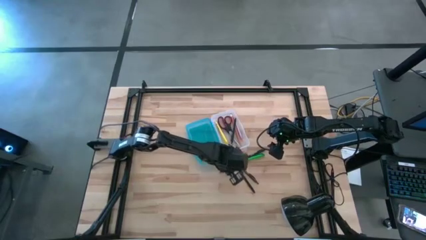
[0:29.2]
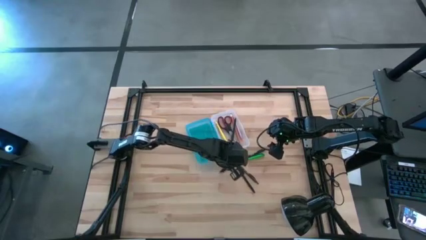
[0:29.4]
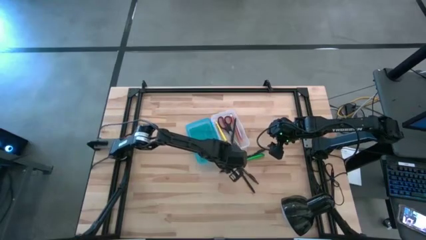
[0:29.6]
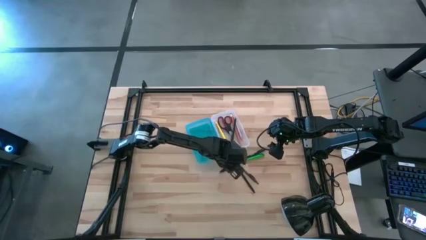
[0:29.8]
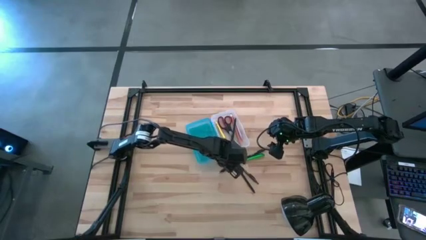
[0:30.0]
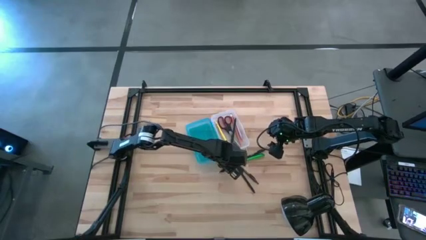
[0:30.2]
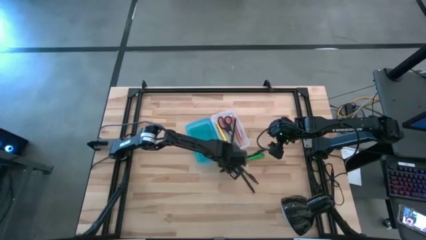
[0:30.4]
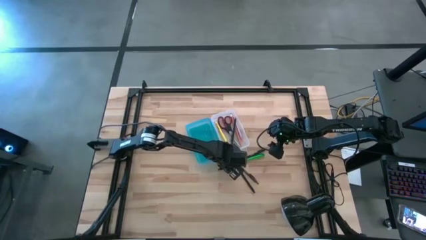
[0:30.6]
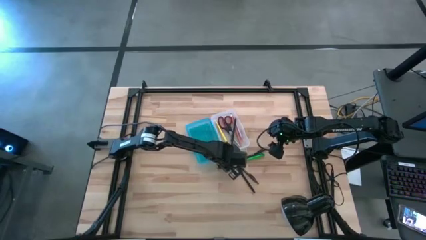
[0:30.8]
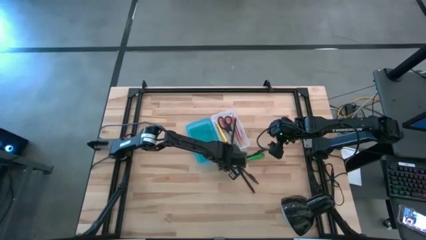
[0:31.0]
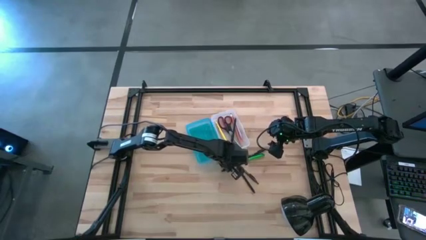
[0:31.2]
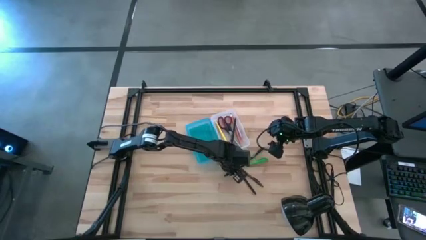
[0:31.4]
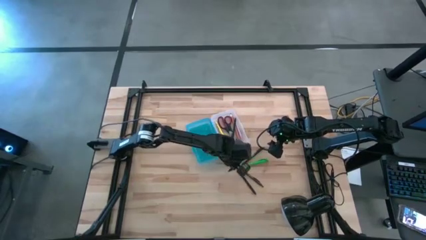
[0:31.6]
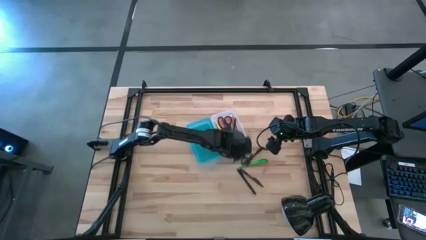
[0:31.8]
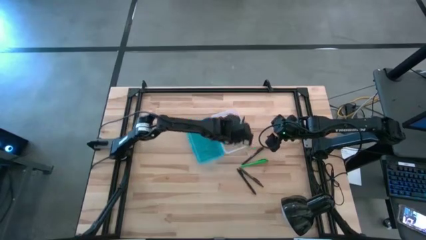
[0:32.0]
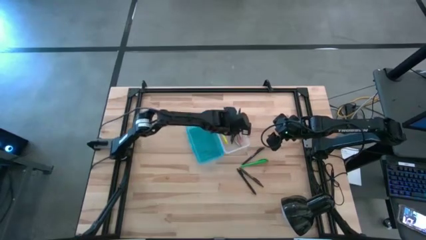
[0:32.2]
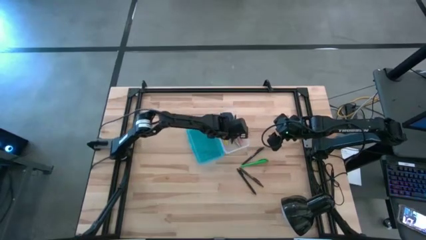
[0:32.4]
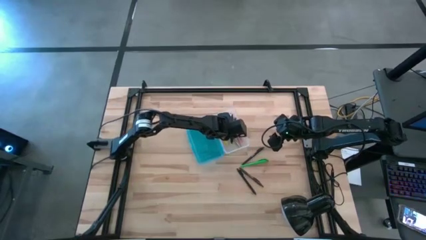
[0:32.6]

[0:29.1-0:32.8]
Task: Pick & place school supplies into a supply box
Put the black pen into the blue supply box

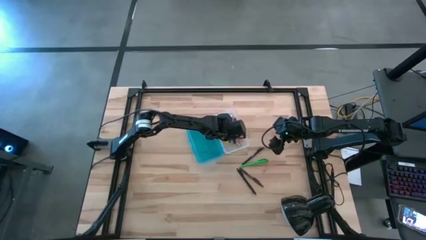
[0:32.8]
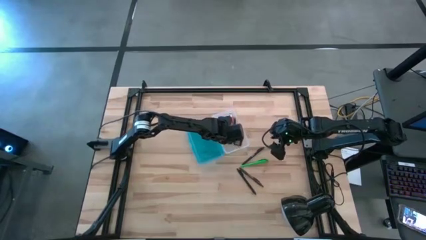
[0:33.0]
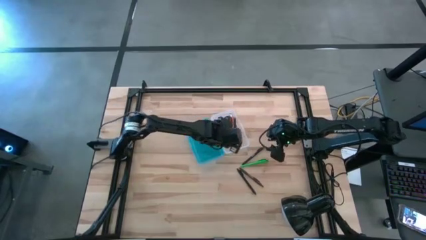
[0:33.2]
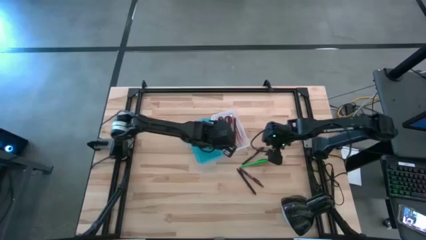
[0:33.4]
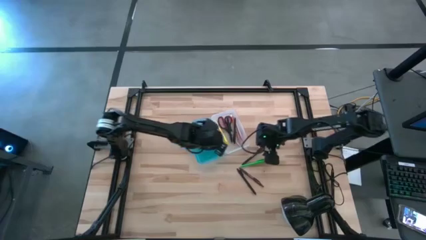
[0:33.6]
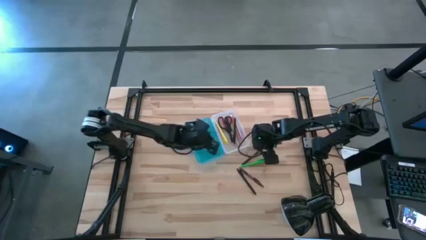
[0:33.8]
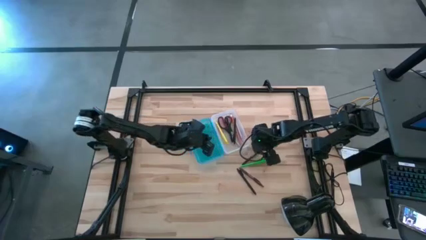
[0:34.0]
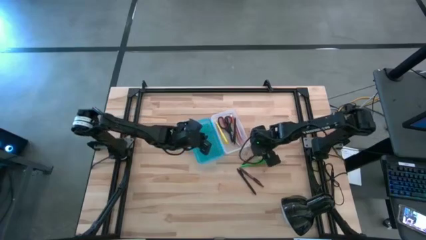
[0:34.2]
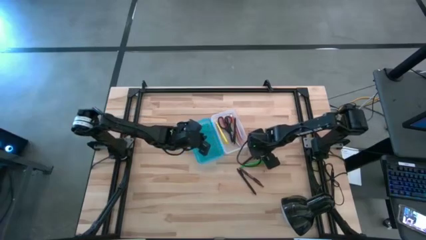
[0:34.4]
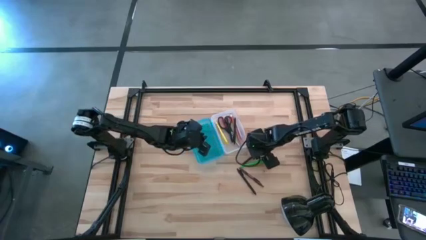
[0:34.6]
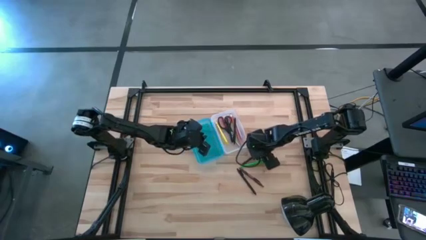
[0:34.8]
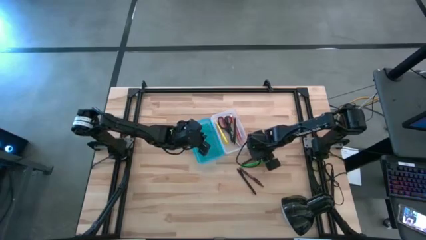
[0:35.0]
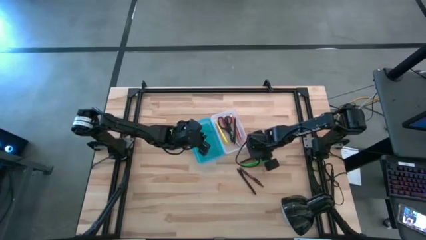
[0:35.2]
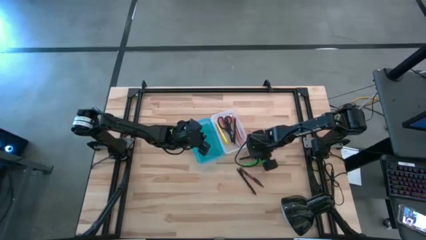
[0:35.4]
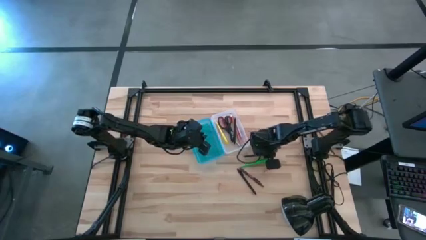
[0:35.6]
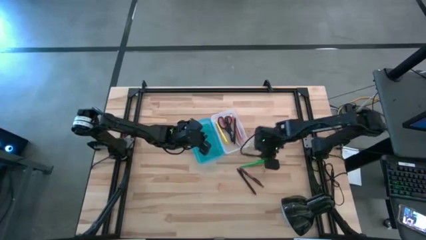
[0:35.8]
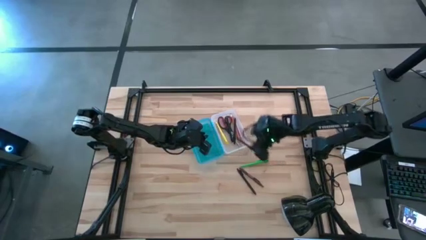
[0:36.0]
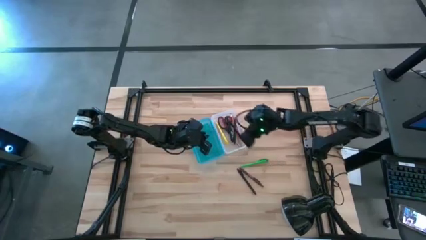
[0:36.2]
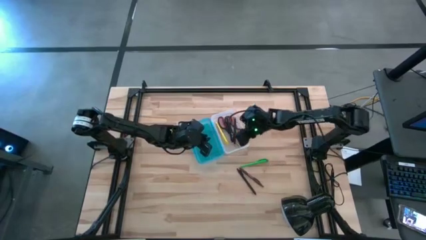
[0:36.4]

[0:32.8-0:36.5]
Put the black pen into the blue supply box

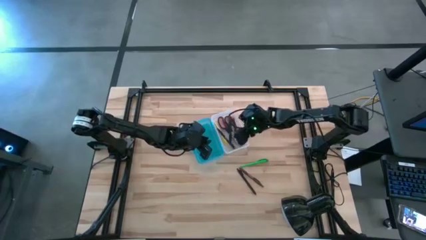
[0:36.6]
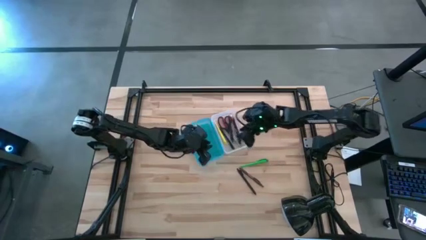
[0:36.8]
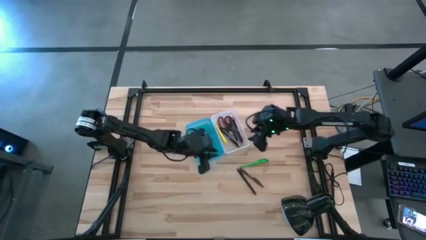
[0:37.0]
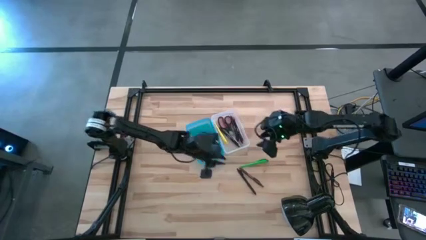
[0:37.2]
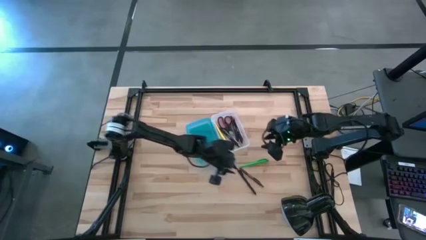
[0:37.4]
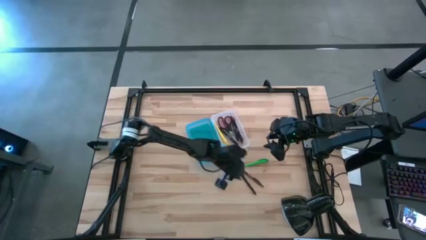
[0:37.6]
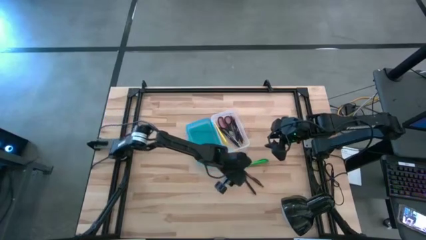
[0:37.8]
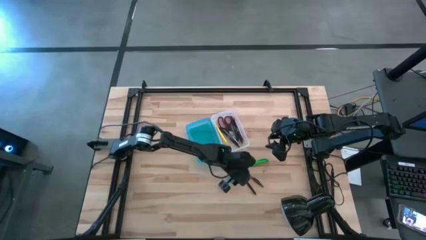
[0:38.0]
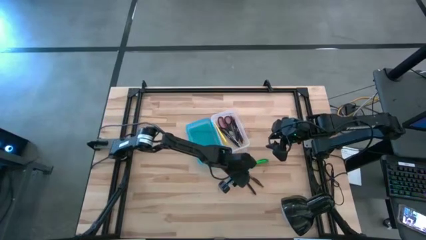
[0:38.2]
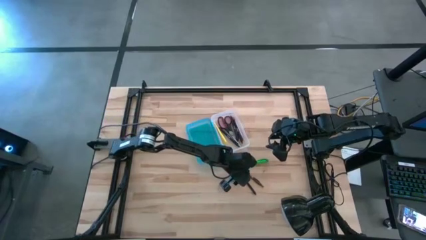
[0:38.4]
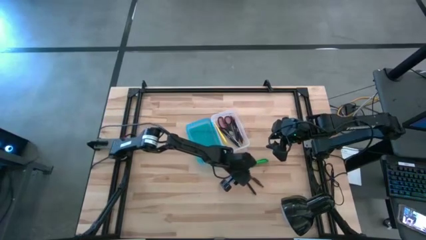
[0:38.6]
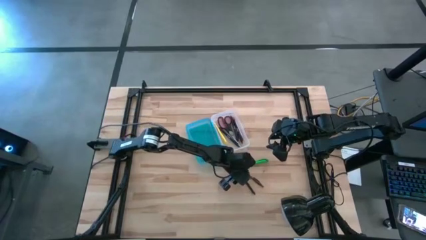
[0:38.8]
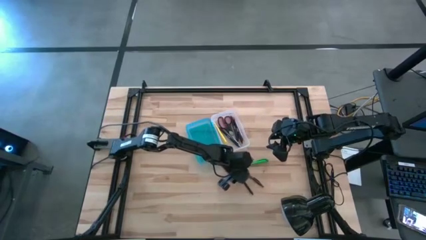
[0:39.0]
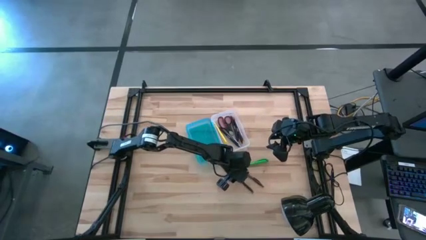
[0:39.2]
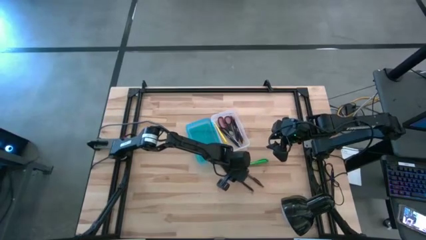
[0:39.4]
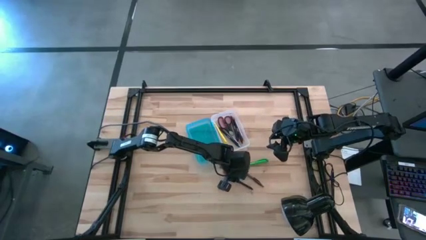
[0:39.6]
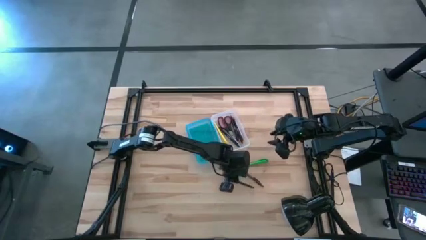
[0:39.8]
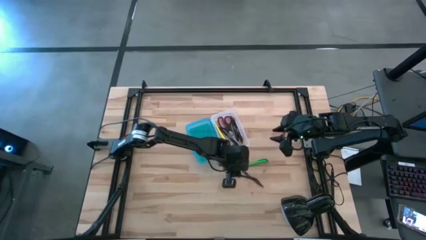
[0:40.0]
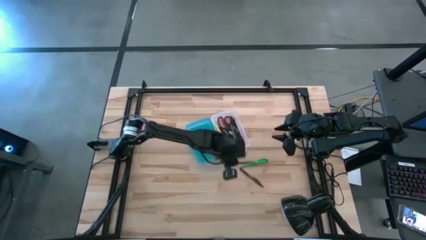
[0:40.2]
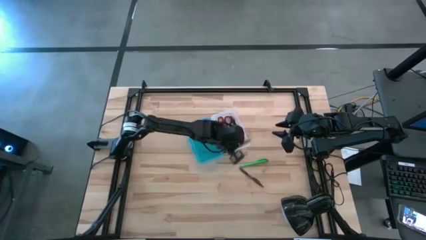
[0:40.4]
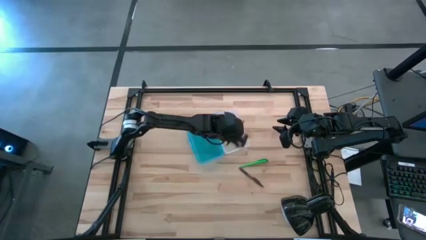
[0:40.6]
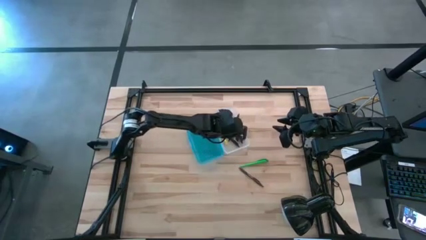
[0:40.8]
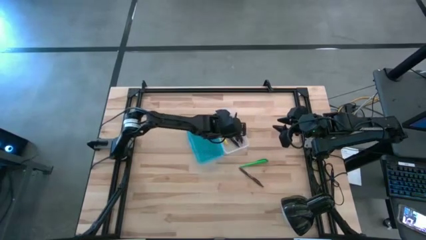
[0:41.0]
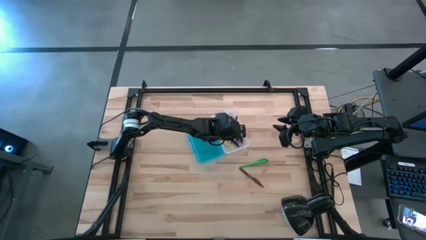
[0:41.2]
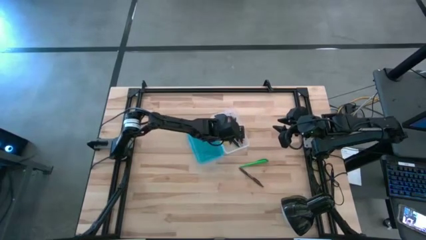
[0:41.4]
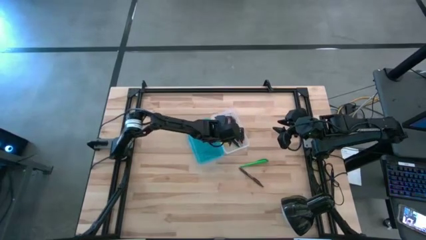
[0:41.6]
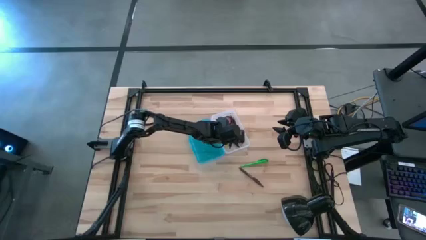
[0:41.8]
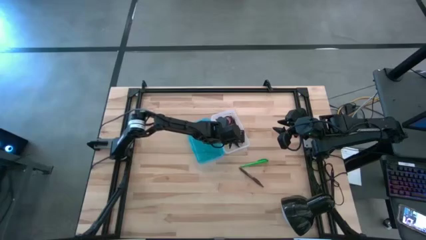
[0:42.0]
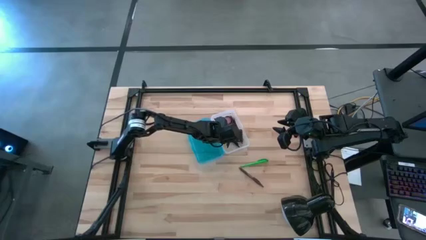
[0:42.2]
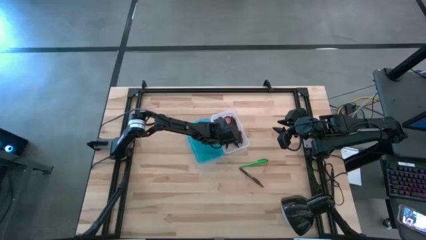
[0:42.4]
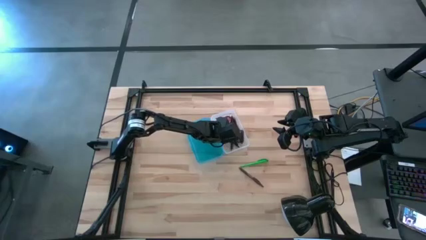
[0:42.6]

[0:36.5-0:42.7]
Put the black pen into the blue supply box

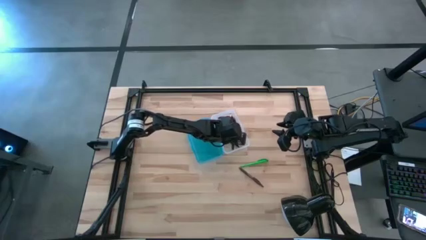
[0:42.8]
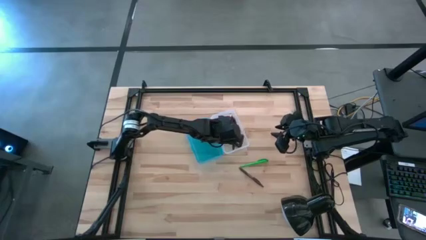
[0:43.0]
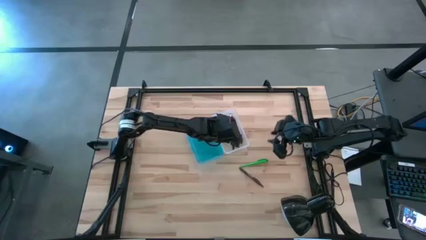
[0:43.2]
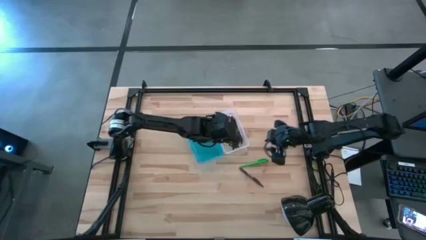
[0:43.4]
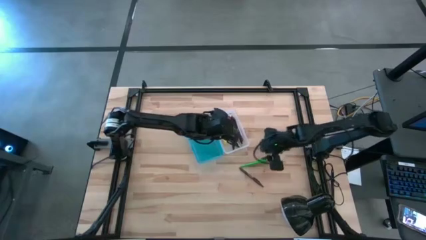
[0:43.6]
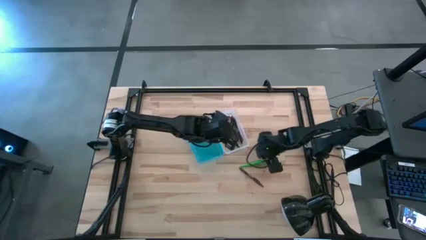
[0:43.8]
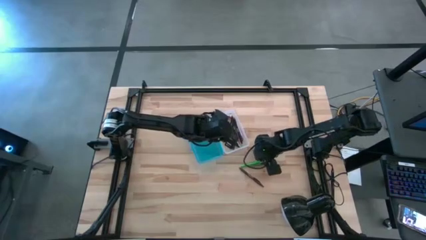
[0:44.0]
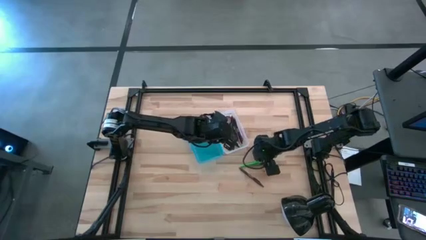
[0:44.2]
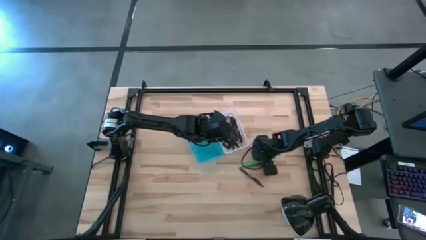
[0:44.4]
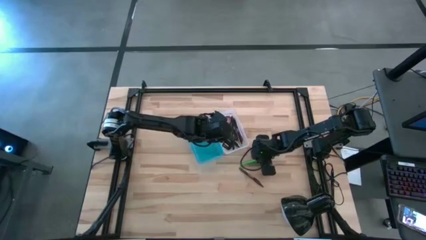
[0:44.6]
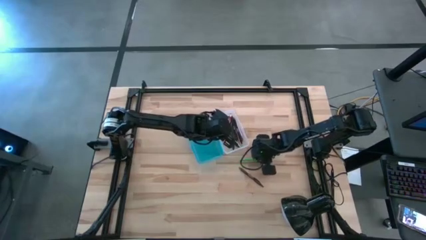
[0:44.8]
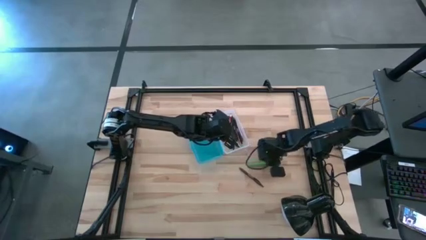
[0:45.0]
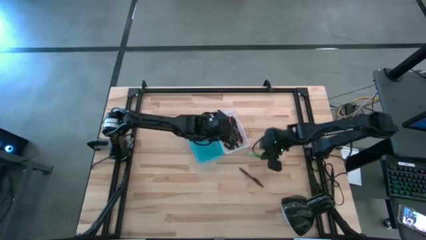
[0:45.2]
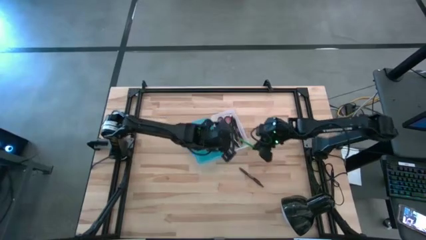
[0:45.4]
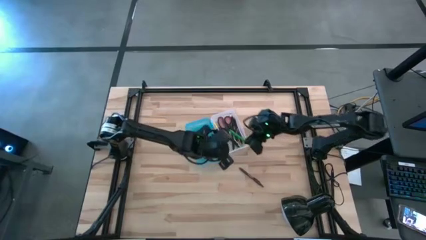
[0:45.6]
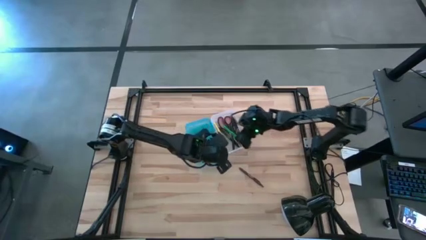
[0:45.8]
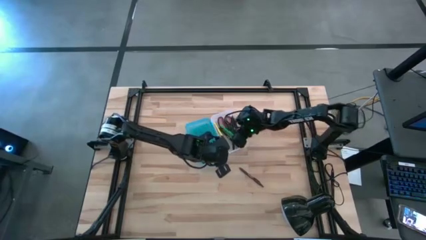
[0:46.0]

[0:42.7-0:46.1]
Put the green pen into the blue supply box
